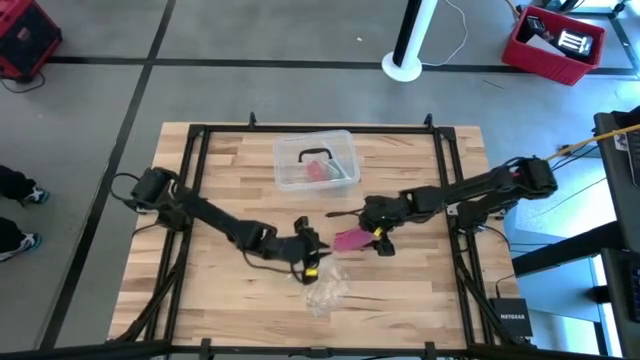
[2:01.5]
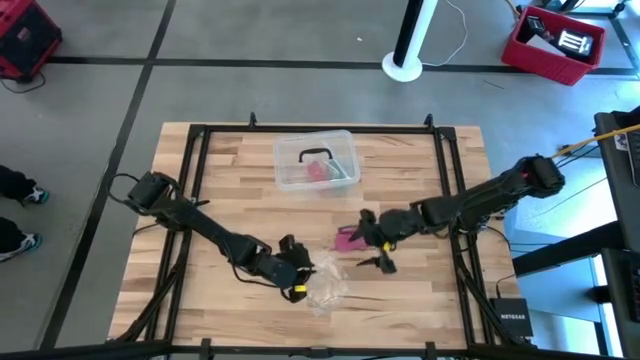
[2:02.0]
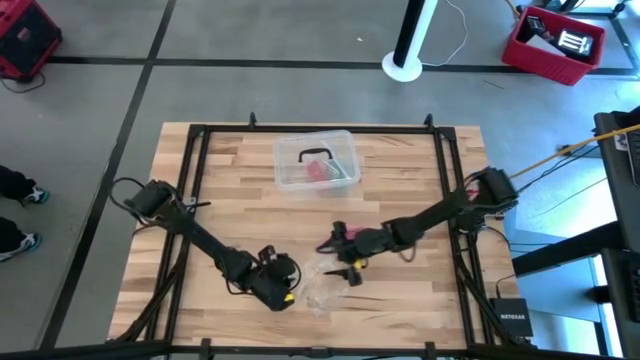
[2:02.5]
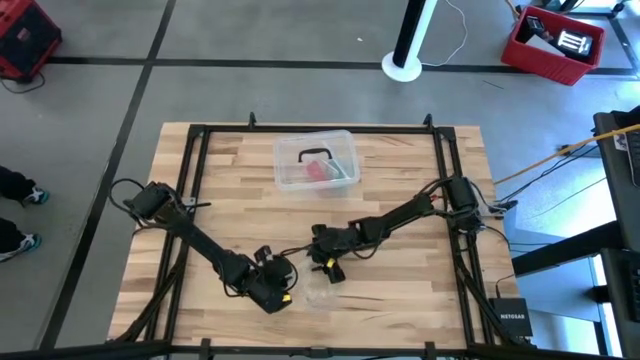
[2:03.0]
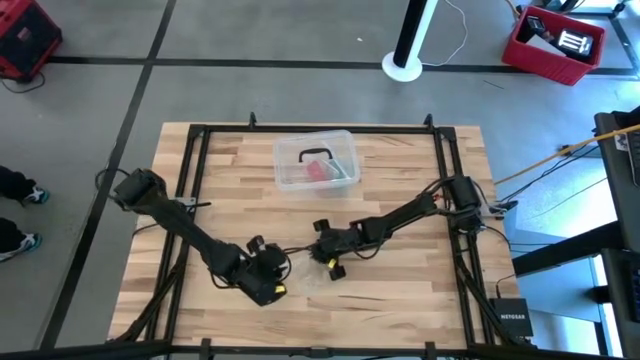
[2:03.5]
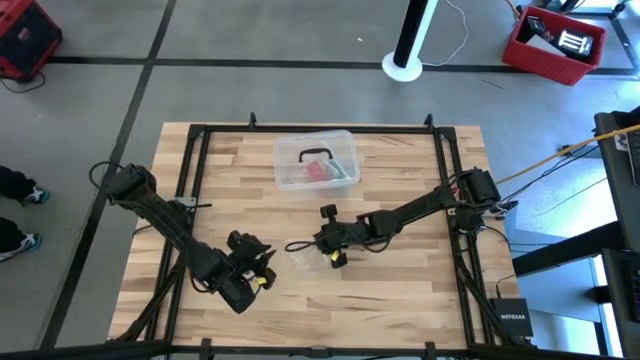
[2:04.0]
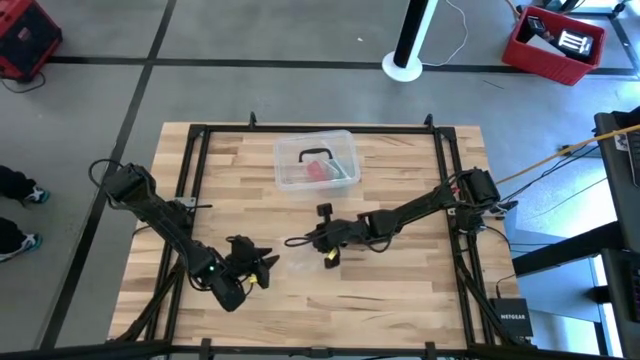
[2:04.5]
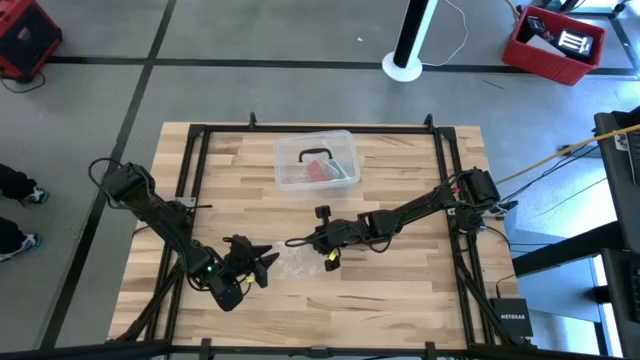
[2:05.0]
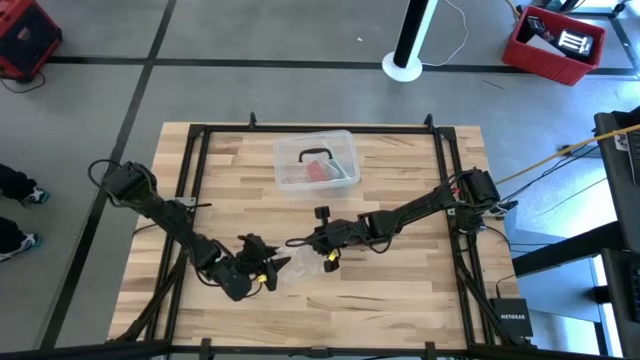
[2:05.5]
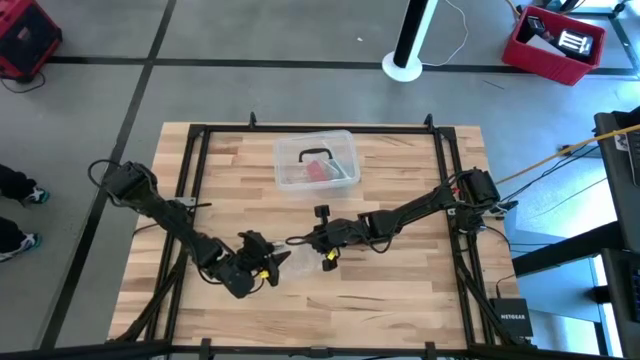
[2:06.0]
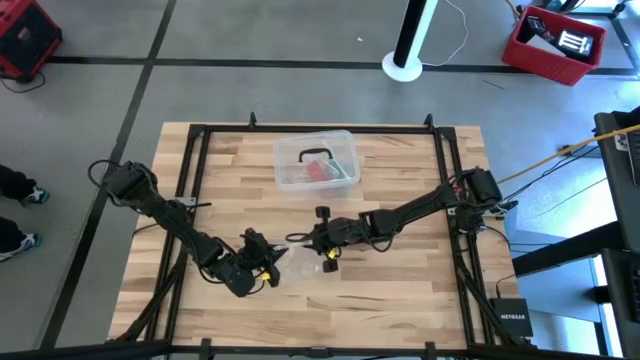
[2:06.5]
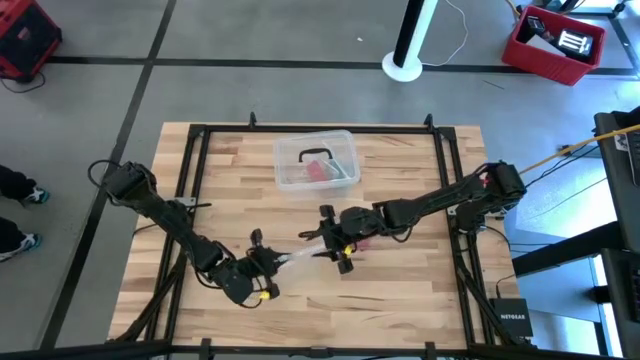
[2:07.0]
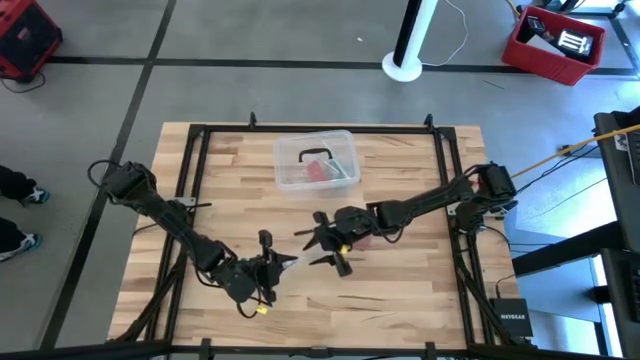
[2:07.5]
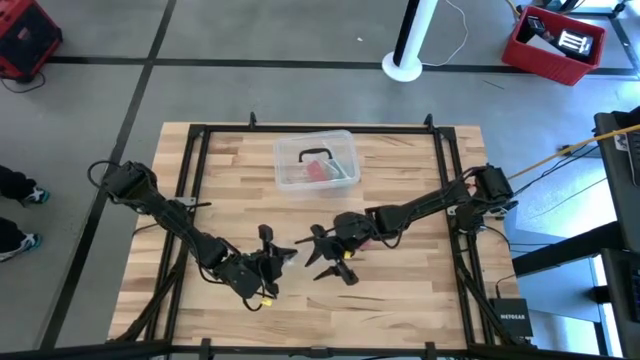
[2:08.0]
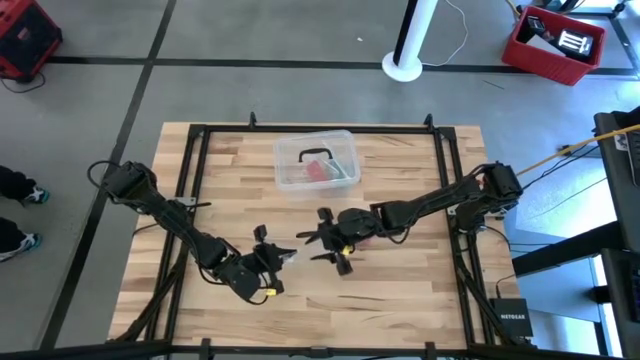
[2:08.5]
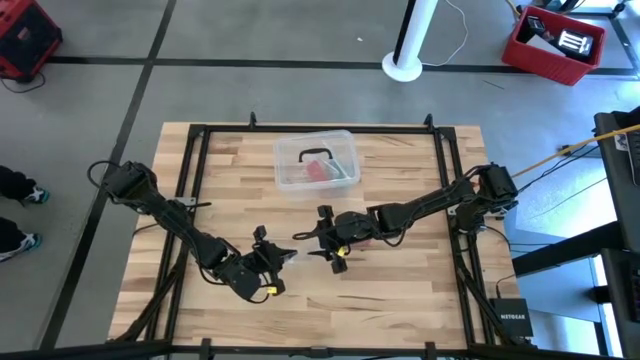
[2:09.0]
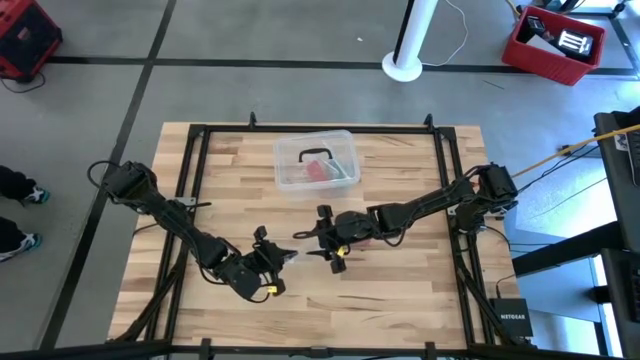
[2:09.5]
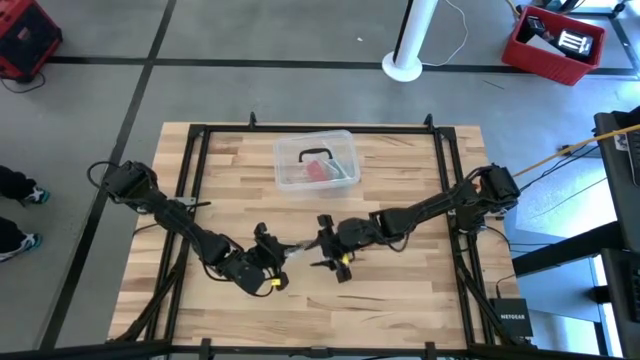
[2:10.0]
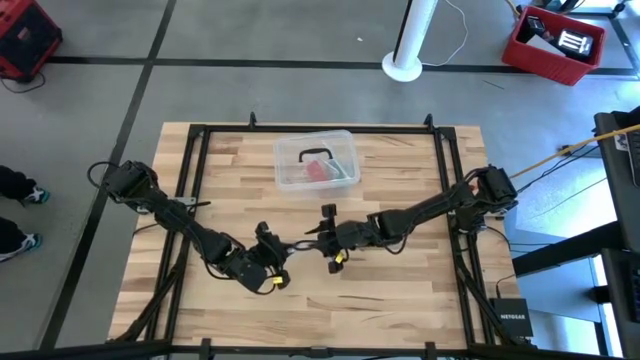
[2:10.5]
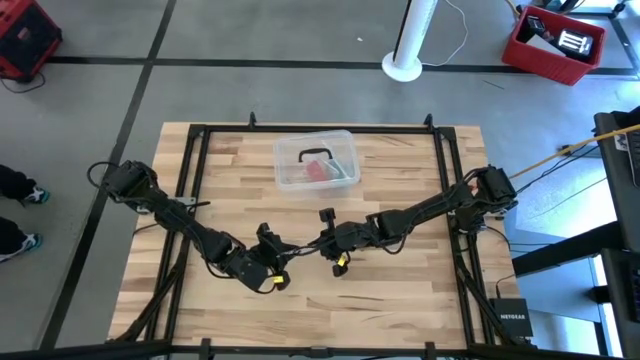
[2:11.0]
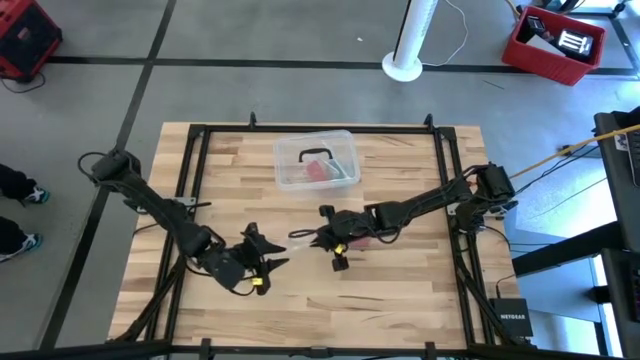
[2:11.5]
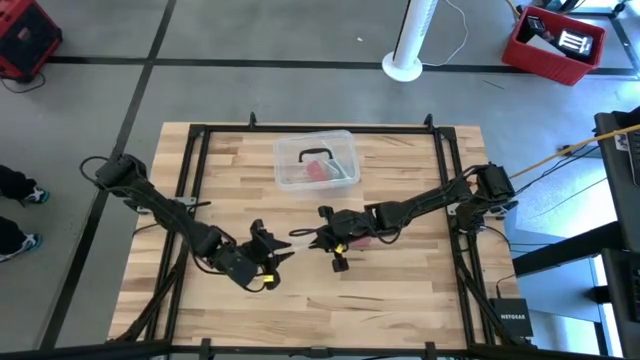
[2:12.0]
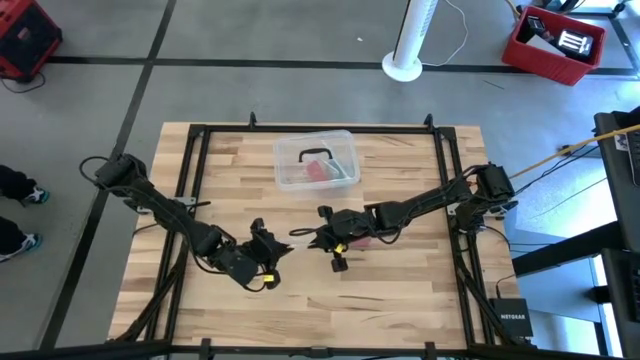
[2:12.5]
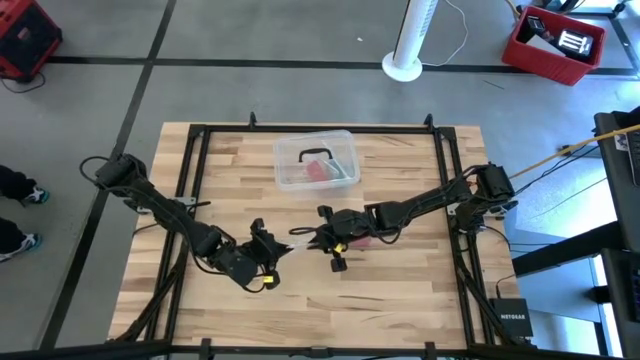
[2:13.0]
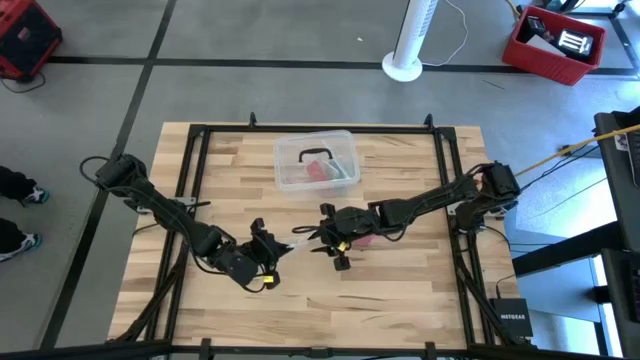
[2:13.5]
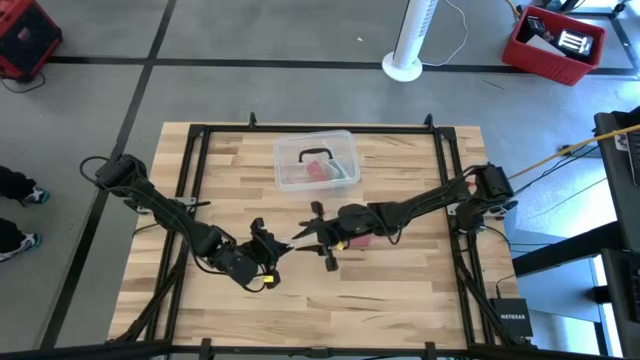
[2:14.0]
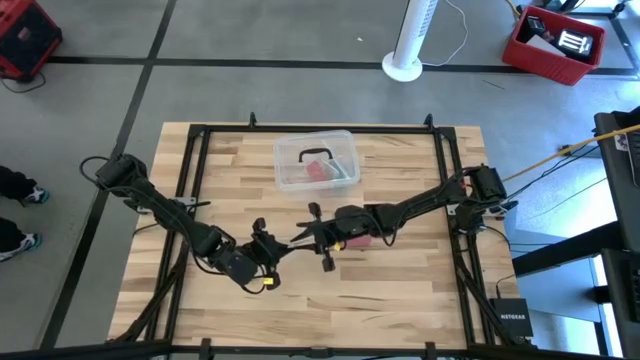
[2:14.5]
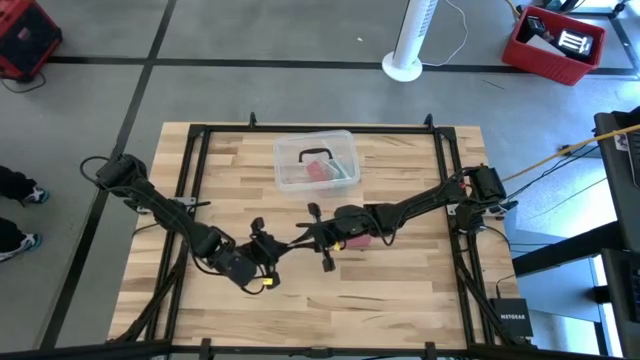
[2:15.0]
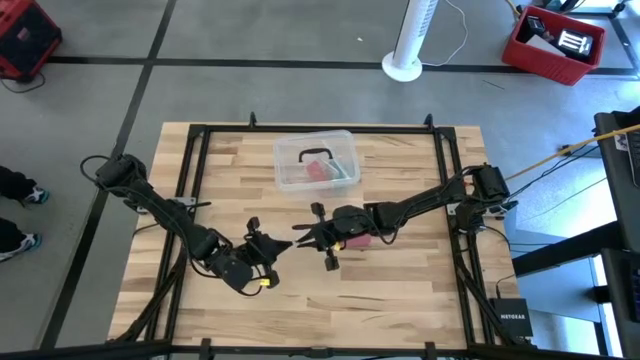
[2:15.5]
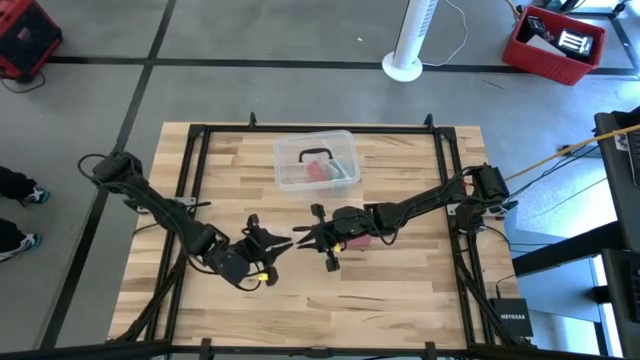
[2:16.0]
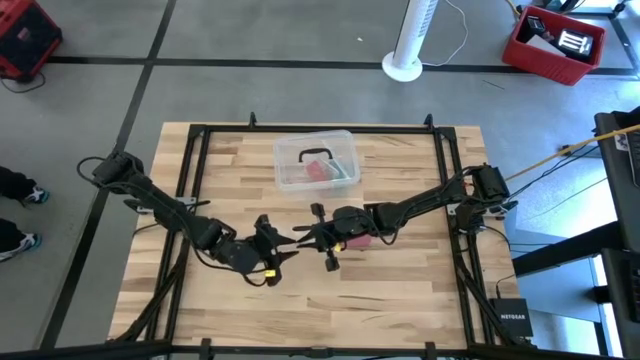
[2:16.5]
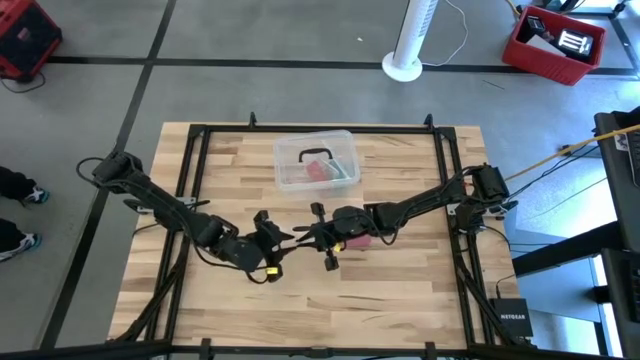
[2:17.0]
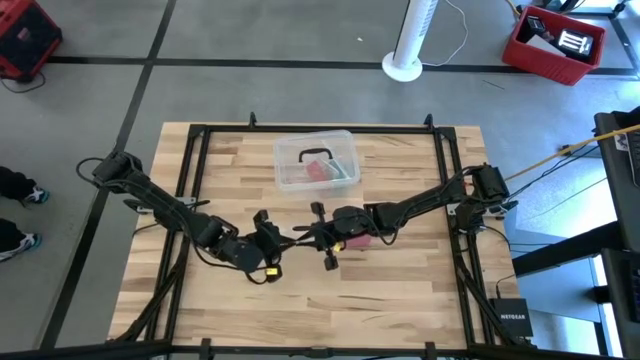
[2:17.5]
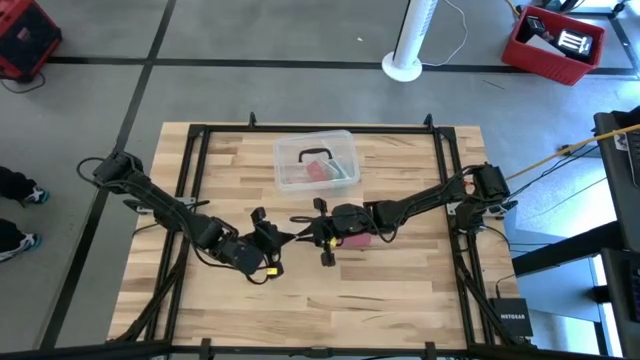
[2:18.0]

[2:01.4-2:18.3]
Task: Roll bandage
Open the transparent zip bag

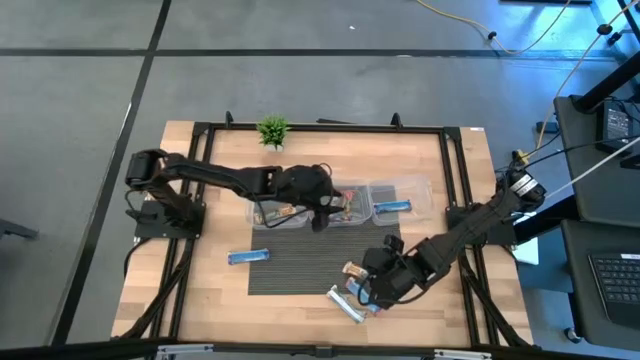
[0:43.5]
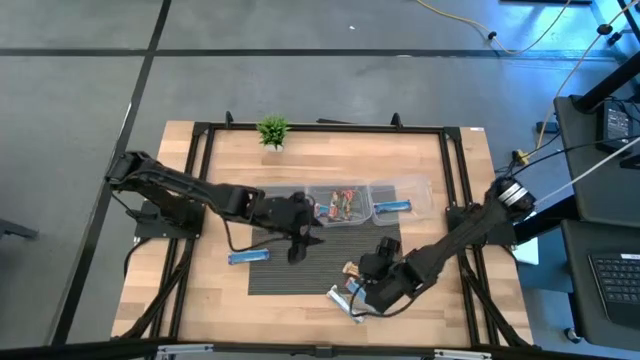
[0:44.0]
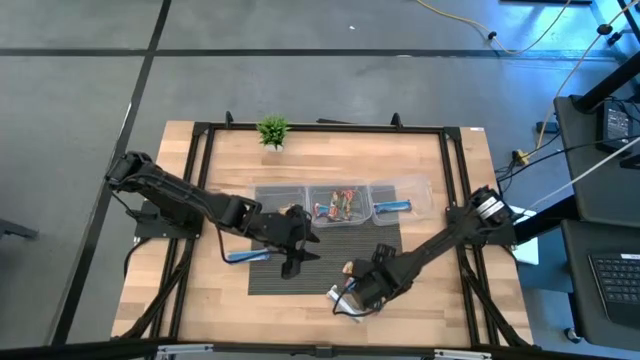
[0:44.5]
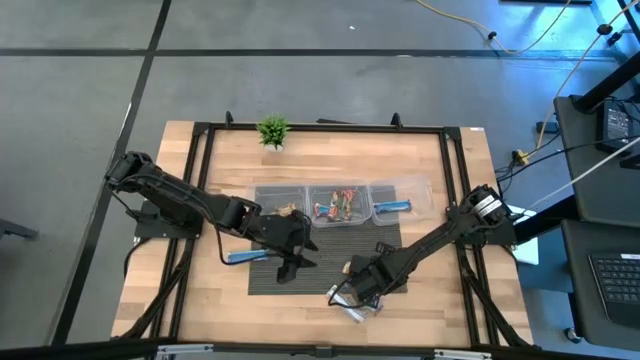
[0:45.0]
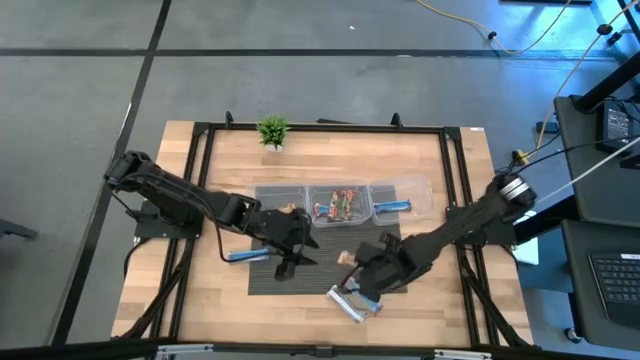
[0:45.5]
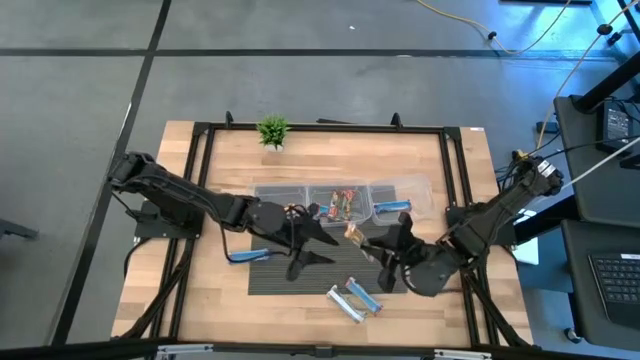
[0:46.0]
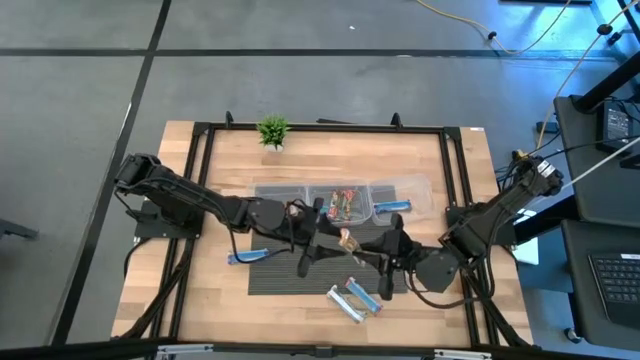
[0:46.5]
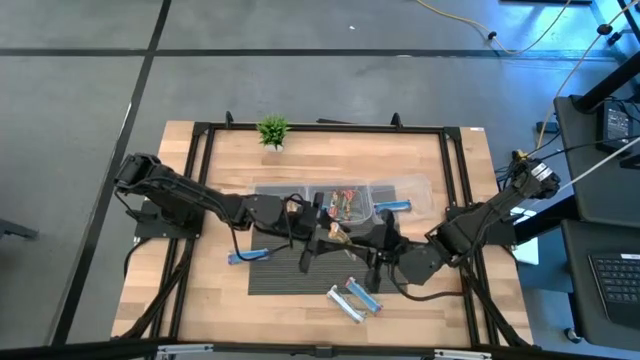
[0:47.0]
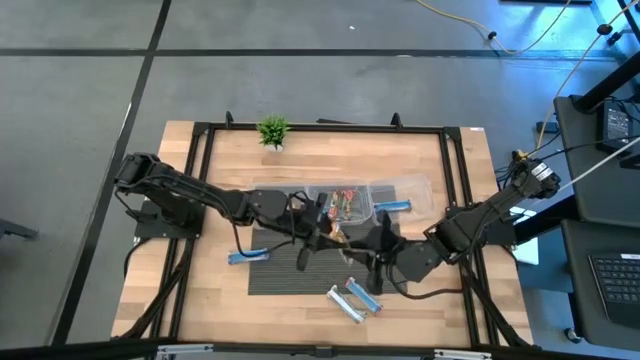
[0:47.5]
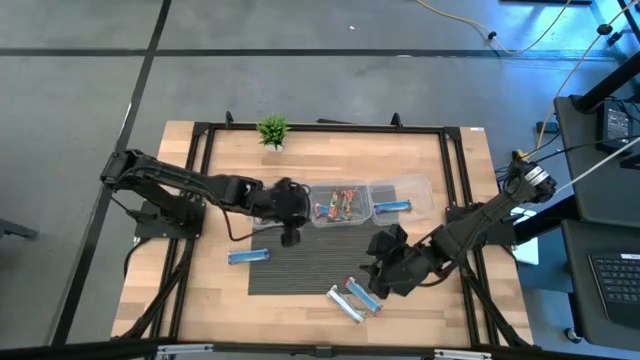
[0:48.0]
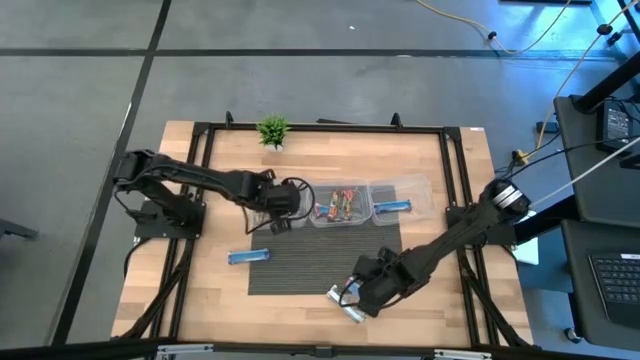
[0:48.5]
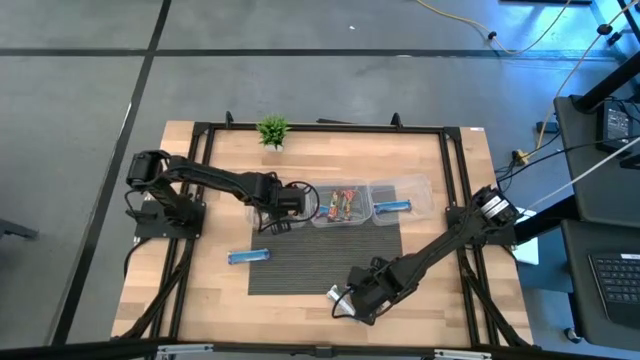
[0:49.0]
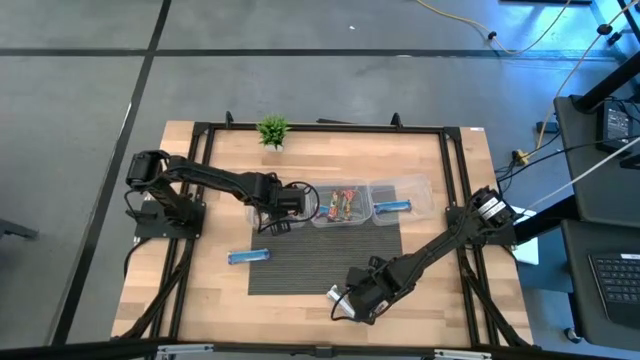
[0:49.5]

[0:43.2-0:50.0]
Task: Pick and place Granola Bars by type
Put the yellow granola bar into the left transparent bin
